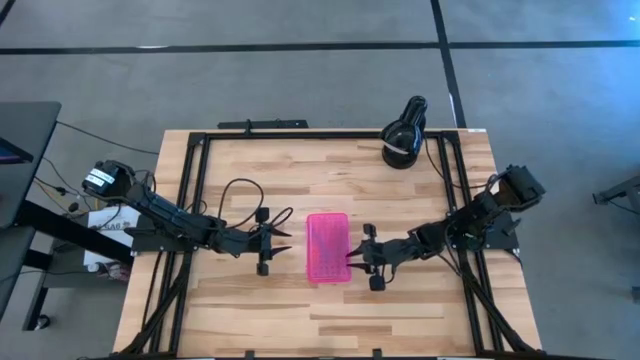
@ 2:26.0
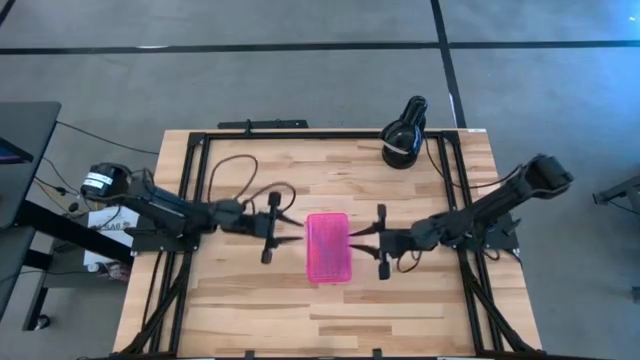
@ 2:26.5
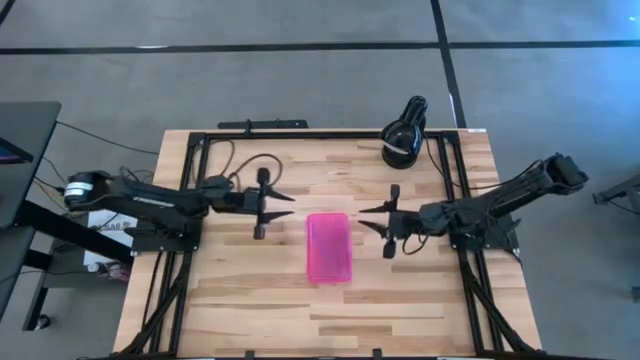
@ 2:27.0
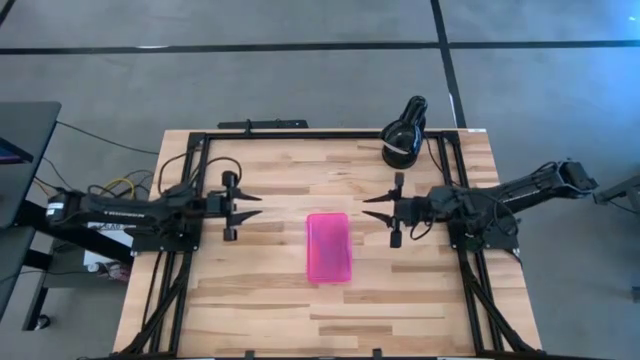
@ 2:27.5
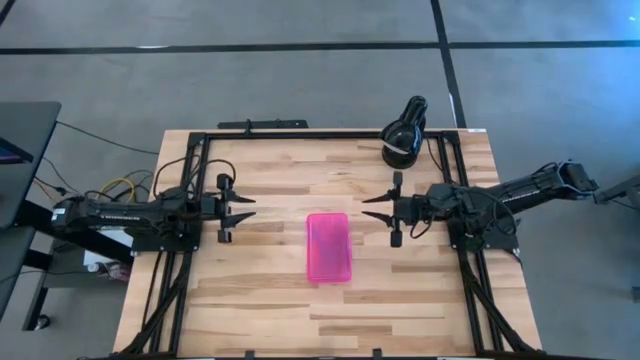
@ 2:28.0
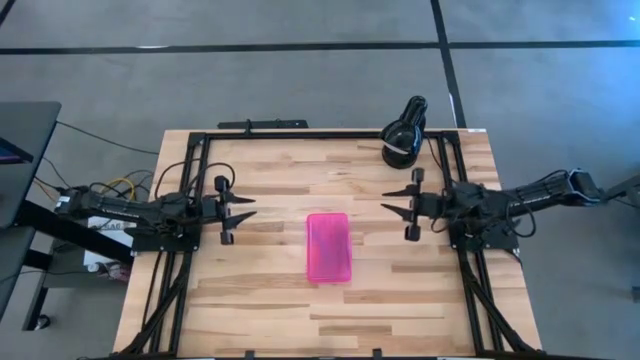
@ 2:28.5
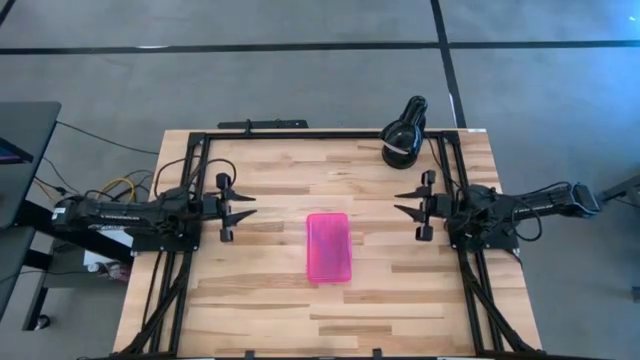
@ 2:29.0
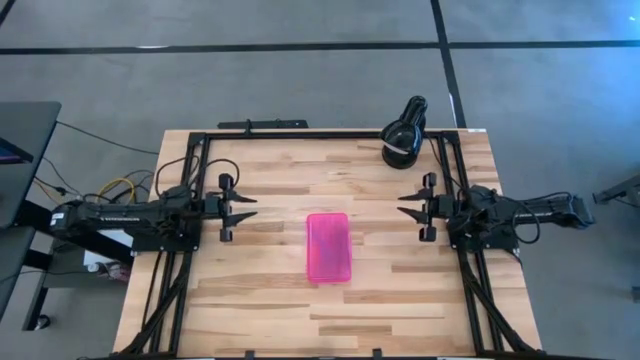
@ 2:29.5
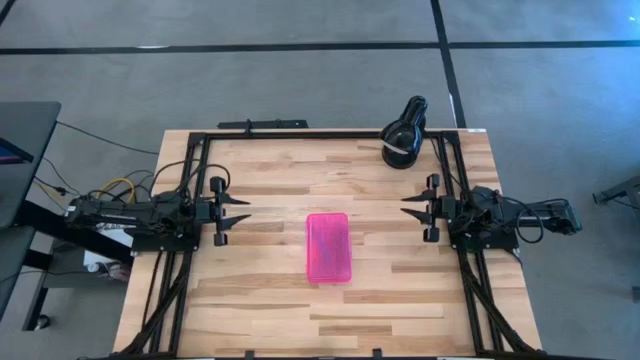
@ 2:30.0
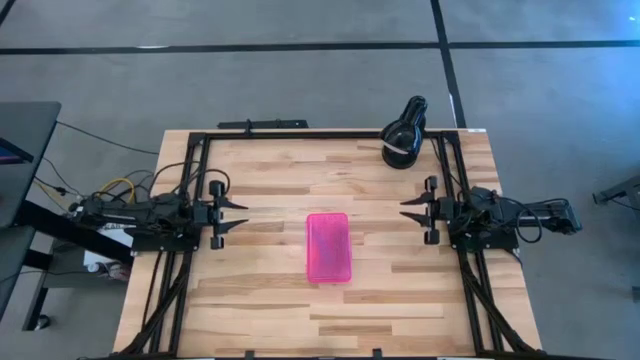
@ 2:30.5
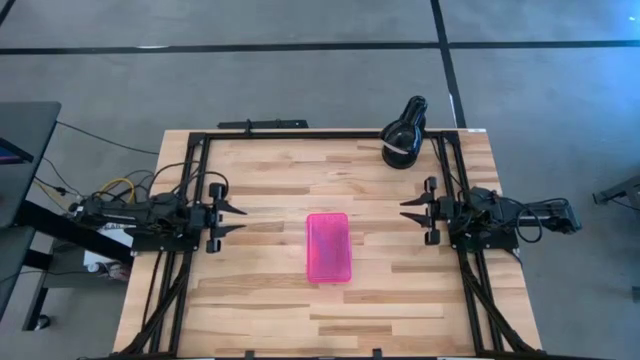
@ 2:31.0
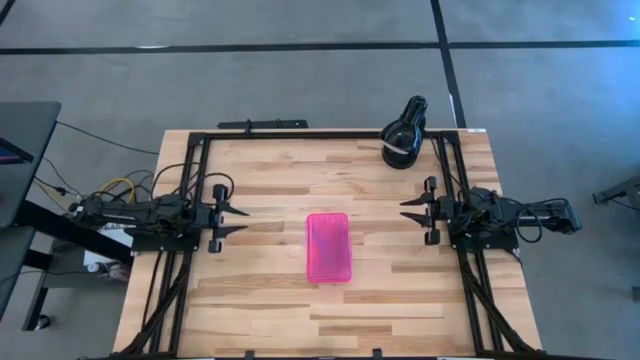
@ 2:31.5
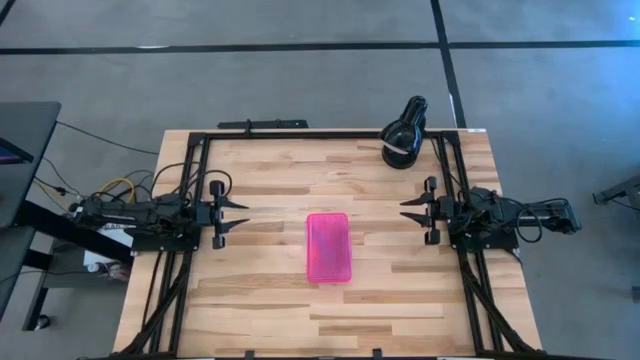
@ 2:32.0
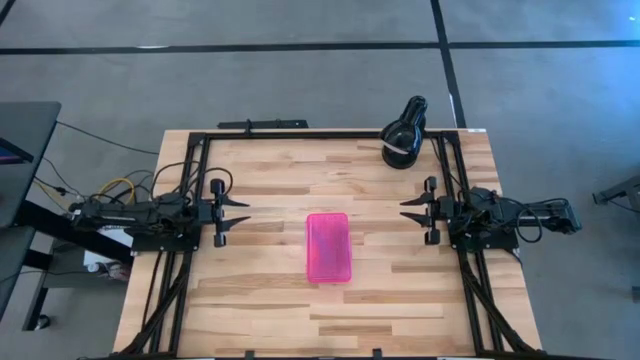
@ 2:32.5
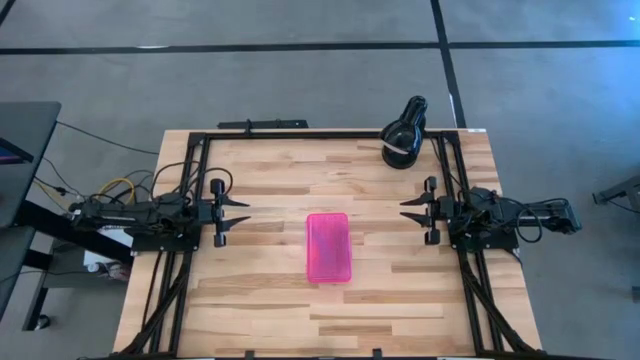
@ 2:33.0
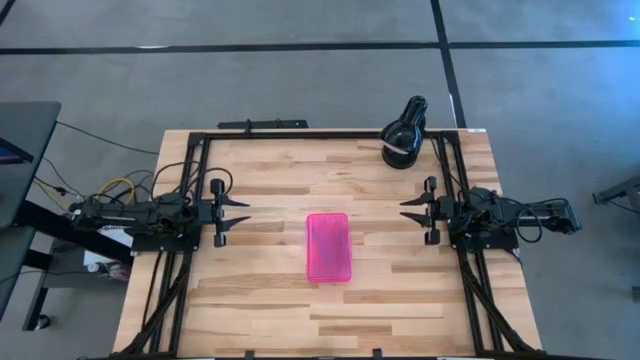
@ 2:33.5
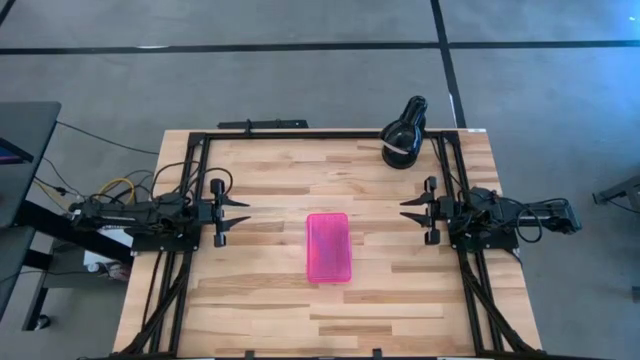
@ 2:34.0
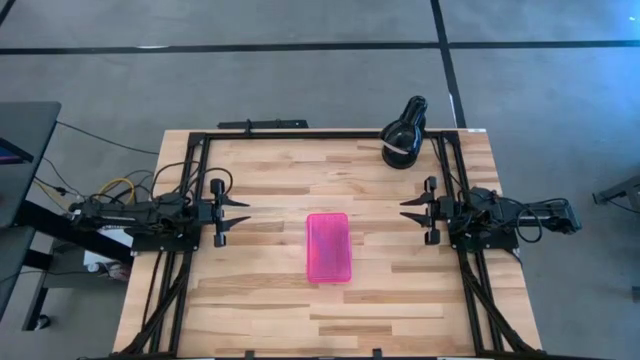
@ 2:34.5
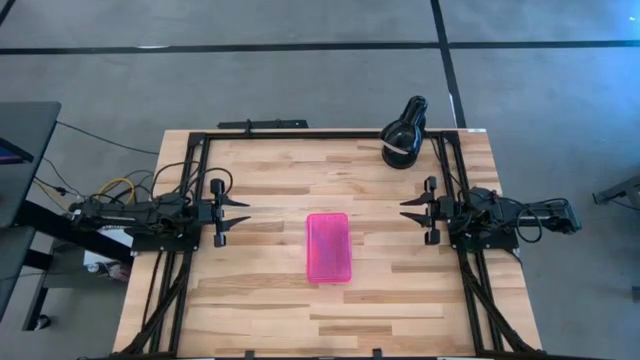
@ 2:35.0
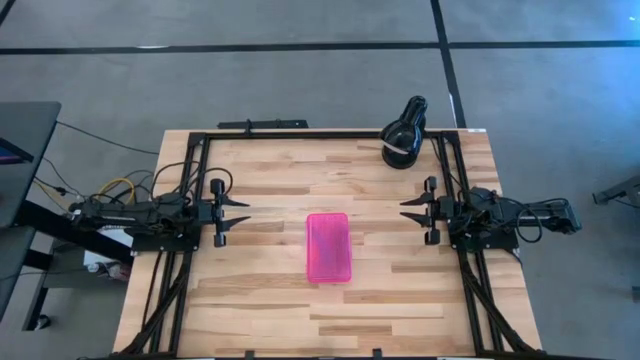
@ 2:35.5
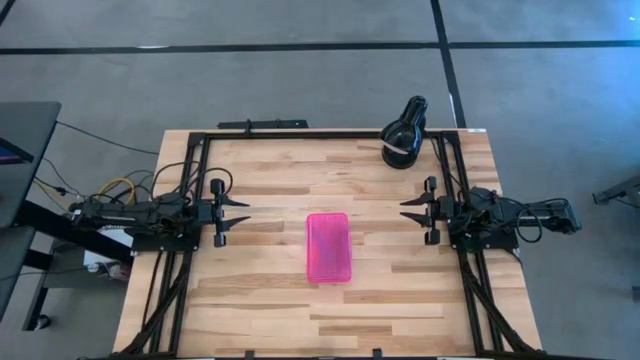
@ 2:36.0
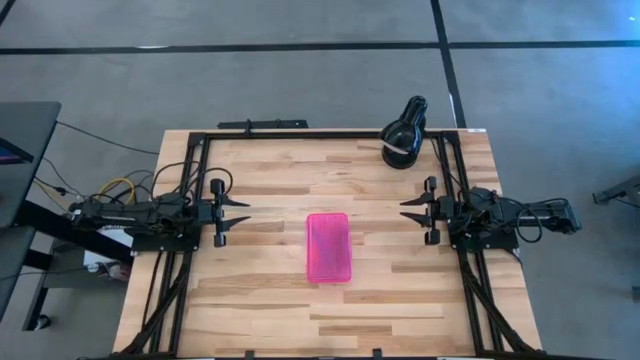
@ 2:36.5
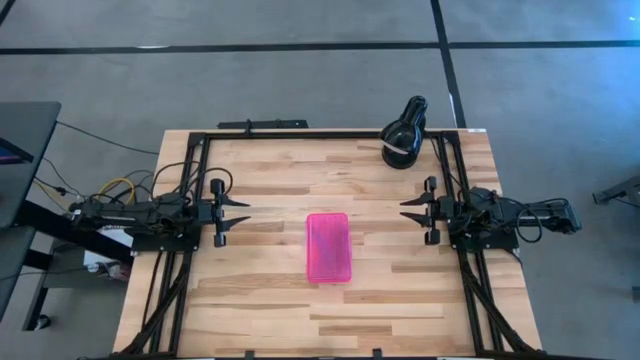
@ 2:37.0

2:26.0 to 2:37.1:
Task: Pick & place school supplies into a supply box
Return to Home Position

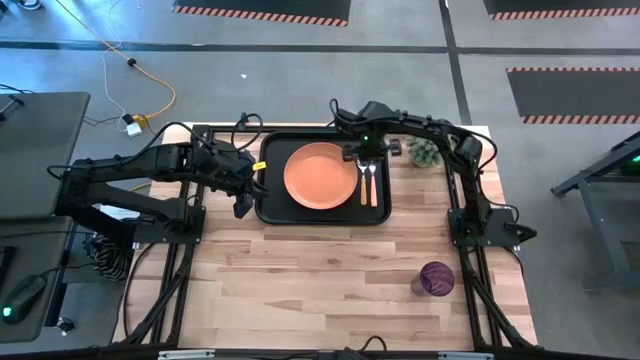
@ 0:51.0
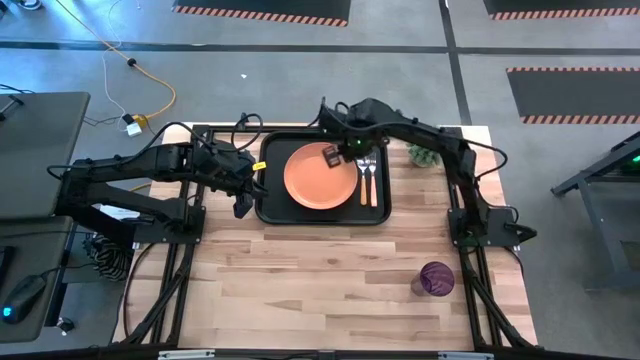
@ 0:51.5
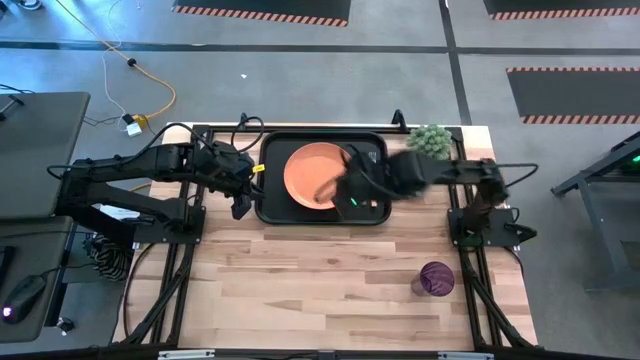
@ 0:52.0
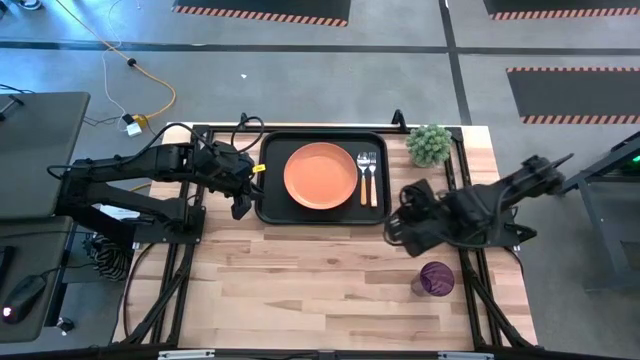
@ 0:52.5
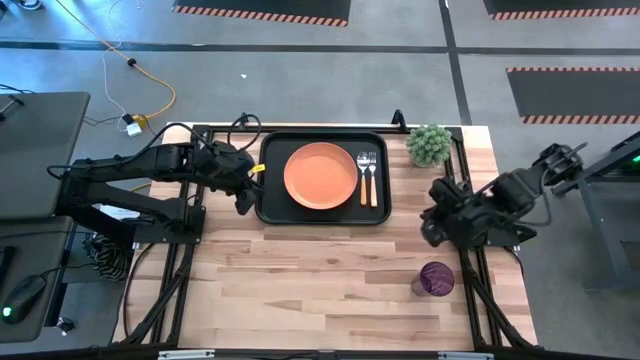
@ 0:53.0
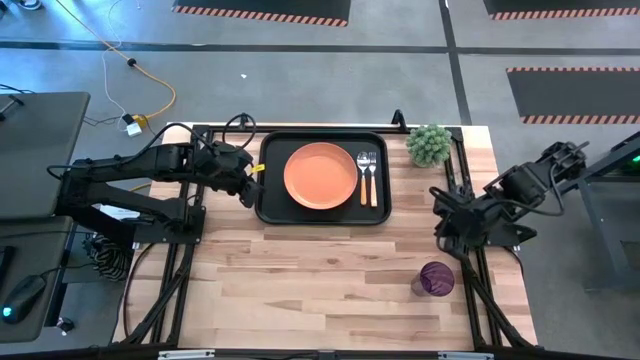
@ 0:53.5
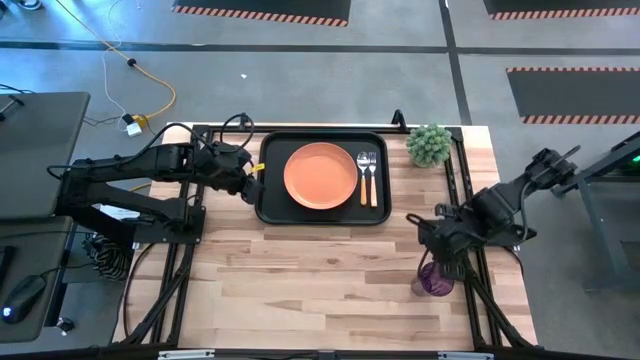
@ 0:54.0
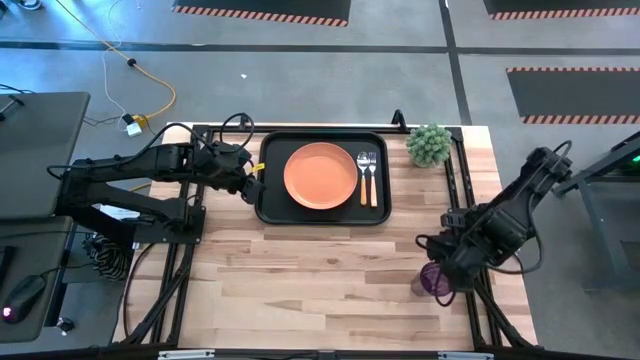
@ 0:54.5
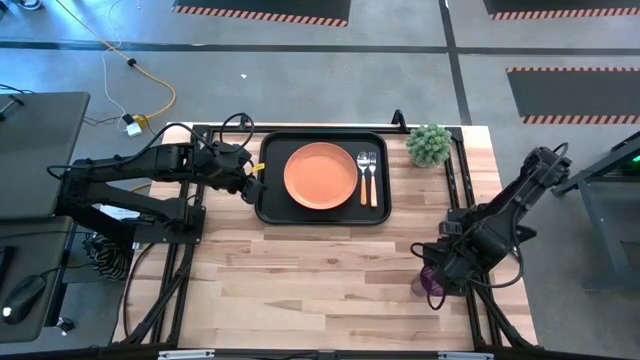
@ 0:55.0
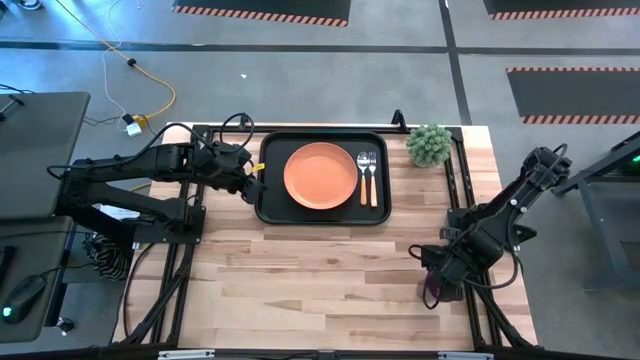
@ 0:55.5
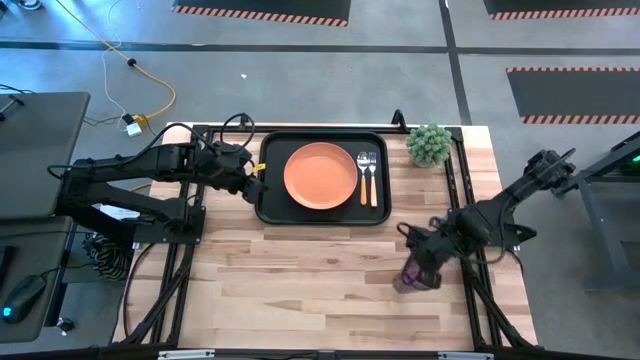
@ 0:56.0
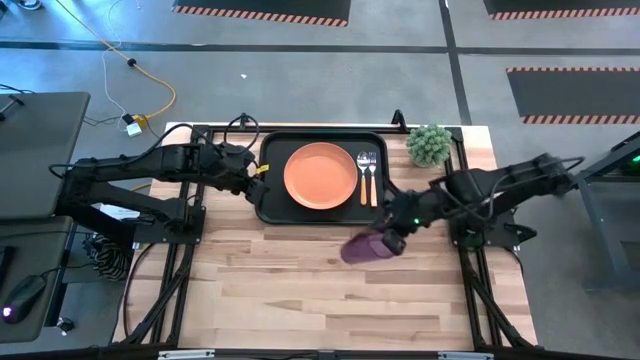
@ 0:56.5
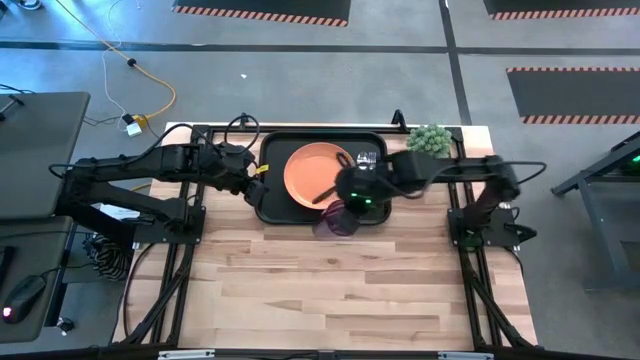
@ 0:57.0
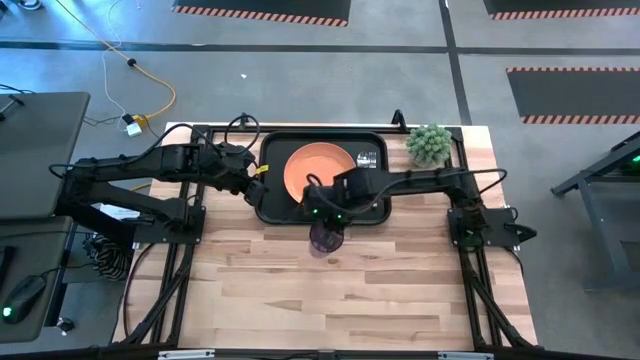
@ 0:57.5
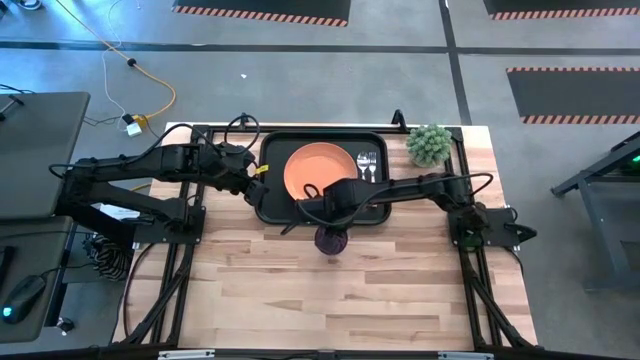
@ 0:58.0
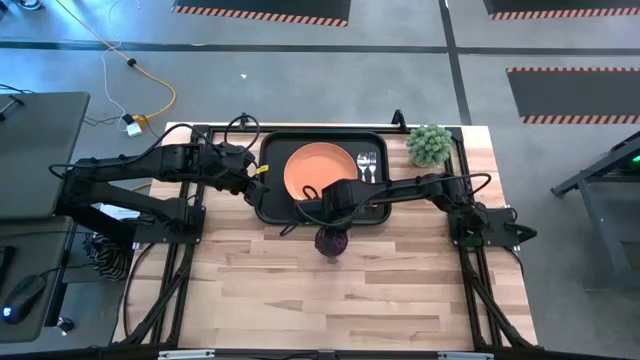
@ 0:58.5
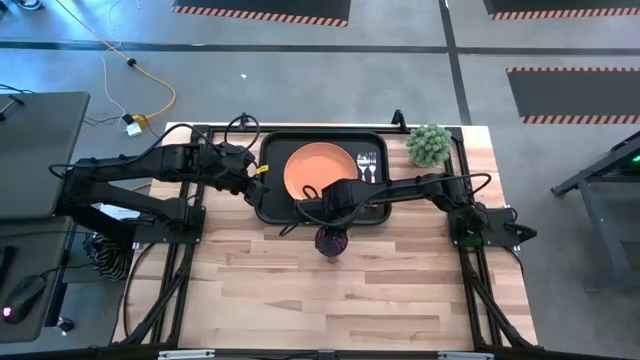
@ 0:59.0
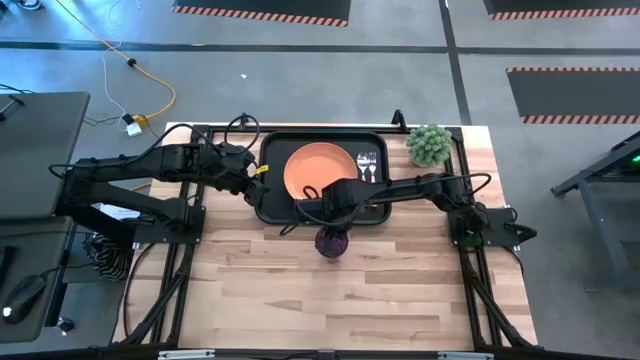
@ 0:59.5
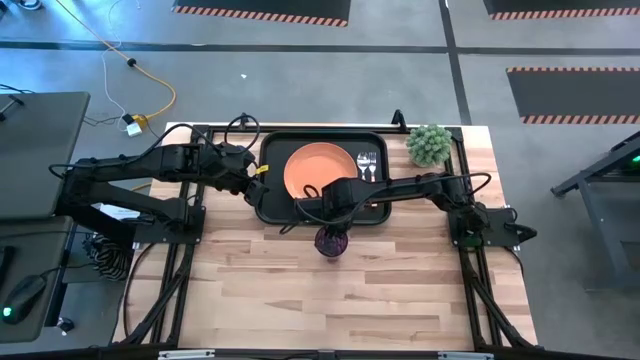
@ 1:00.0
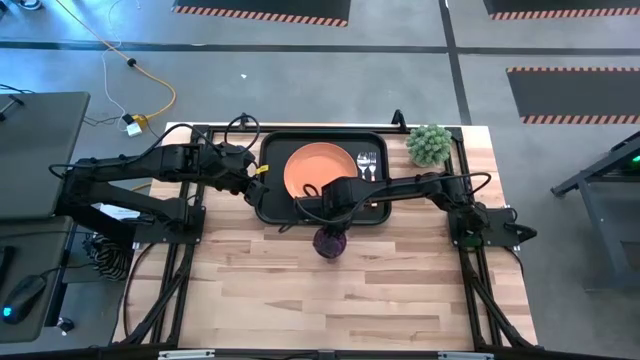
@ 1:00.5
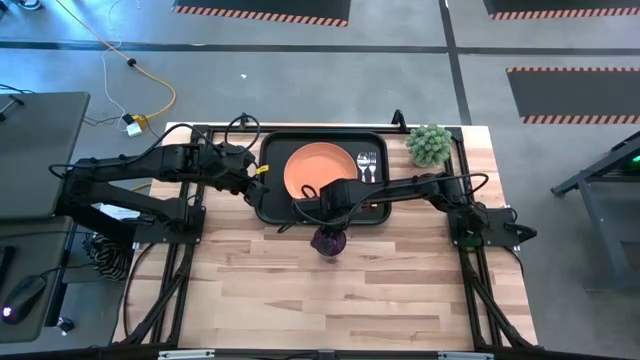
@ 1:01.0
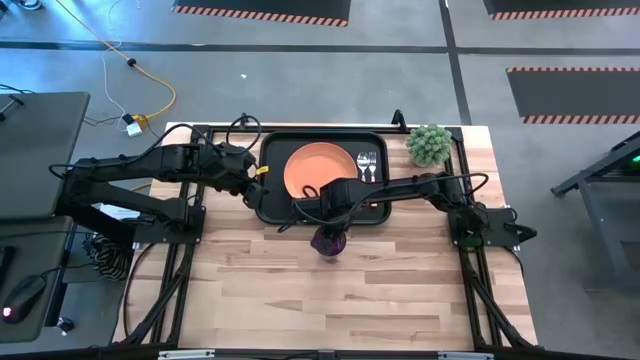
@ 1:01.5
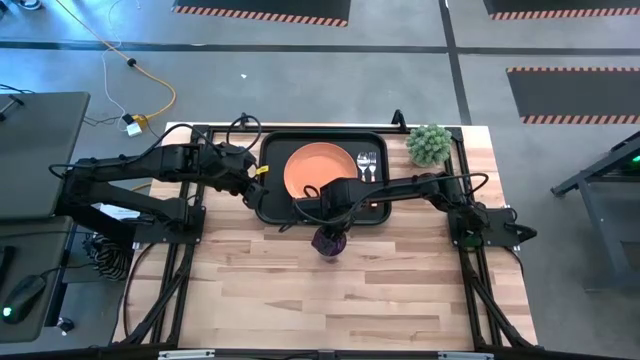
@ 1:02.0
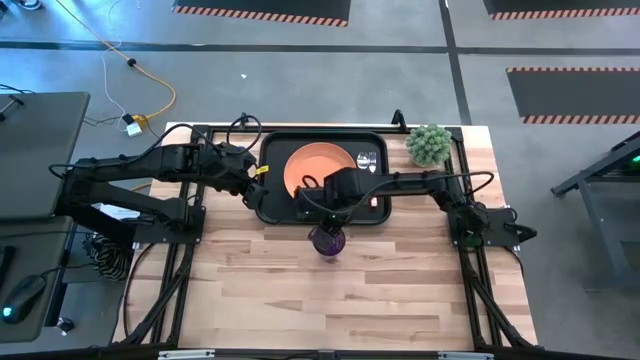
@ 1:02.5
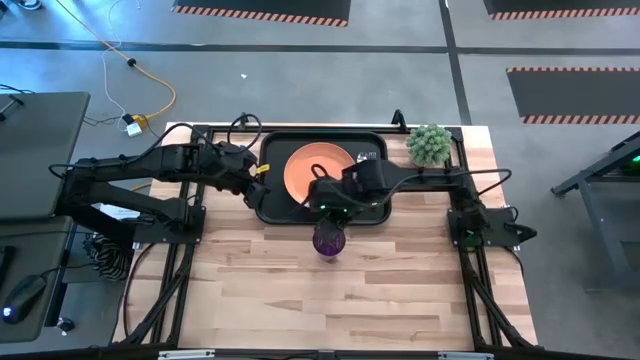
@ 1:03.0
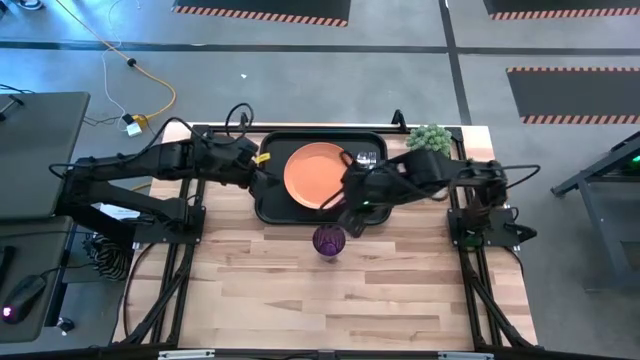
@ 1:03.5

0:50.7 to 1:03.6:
Task: Pick and place plate/cup/fork/spoon on tray
Put the purple glass on the black serving tray to the top left of the orange plate
